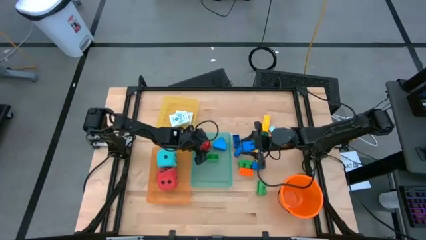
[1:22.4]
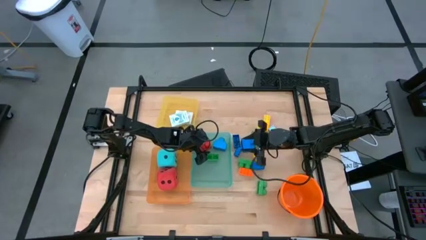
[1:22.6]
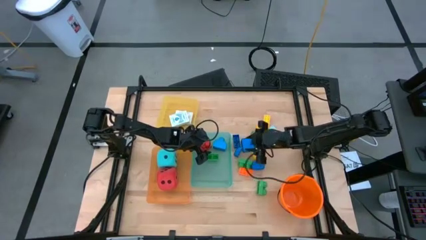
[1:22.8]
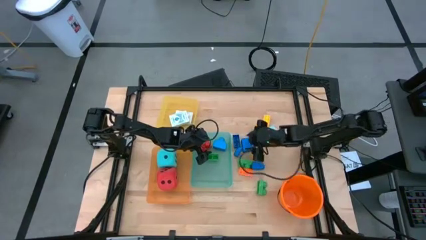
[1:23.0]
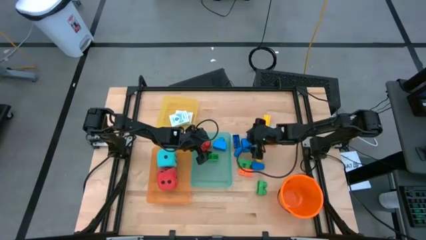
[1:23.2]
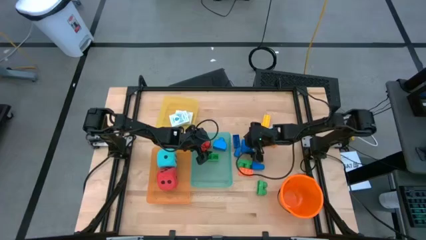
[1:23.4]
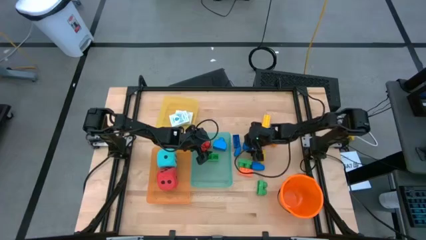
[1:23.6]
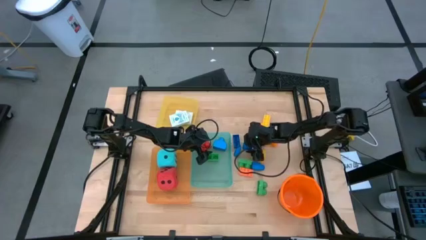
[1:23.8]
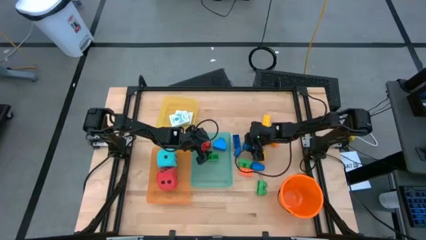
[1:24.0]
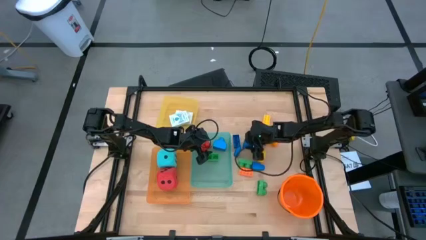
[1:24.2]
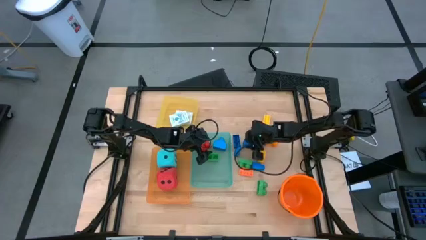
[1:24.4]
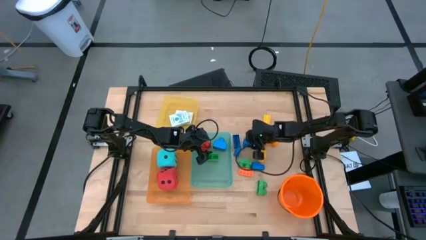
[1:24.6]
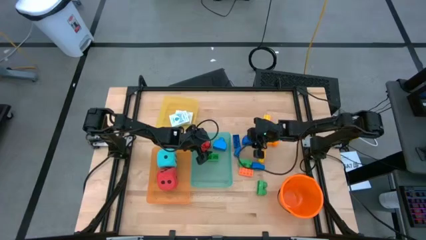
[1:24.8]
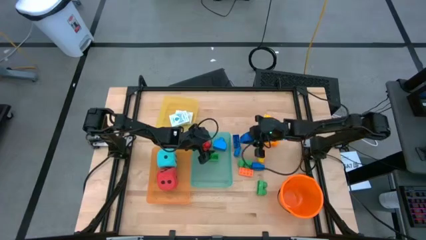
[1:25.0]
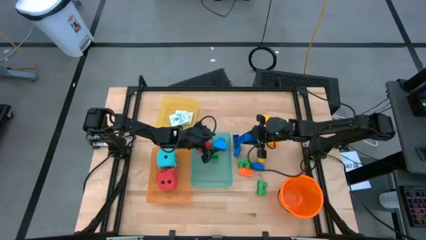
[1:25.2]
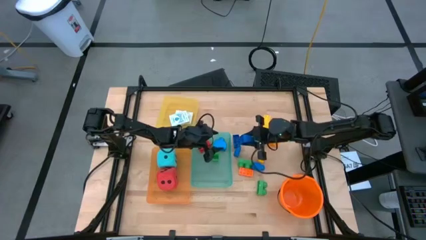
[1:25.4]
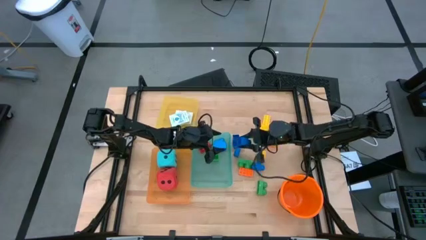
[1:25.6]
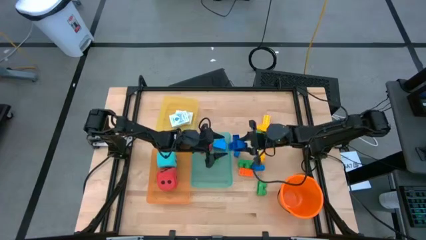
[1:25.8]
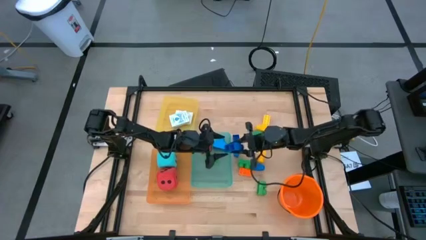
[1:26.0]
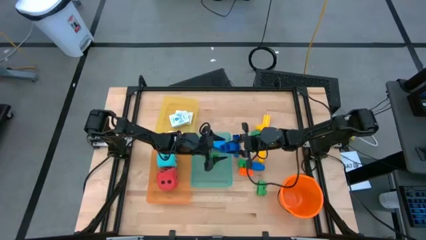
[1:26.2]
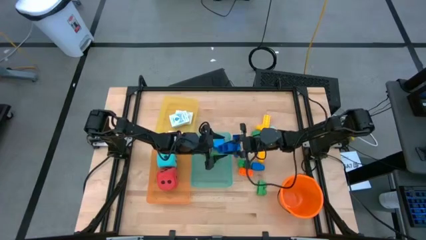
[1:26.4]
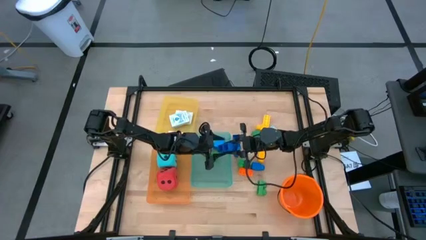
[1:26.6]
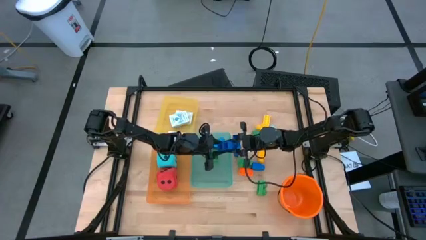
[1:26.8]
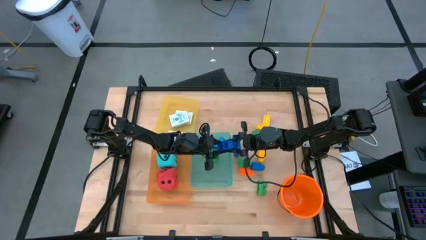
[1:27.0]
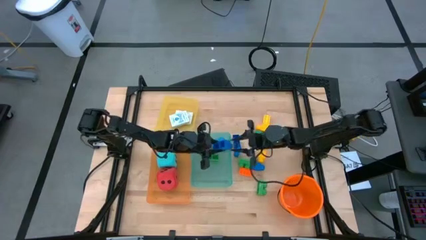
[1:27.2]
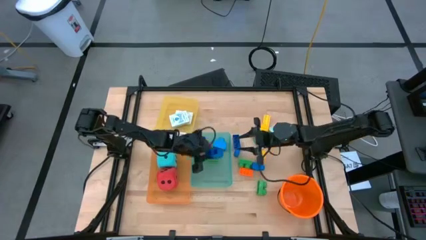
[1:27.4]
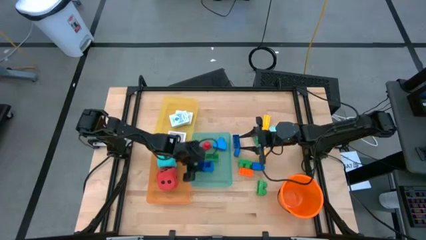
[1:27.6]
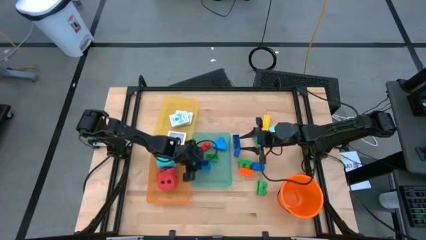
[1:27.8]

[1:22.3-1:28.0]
Task: Pick & Place Toys
Put the blue game piece into the green bin

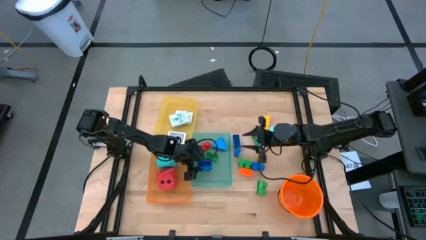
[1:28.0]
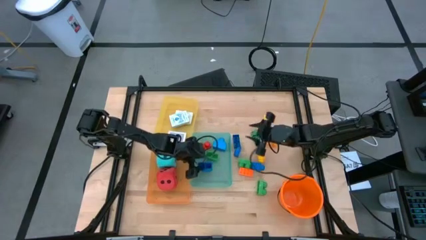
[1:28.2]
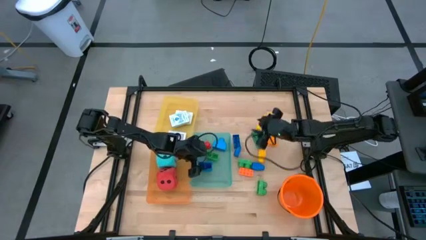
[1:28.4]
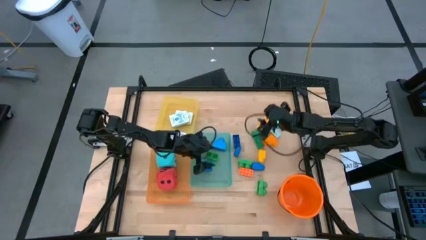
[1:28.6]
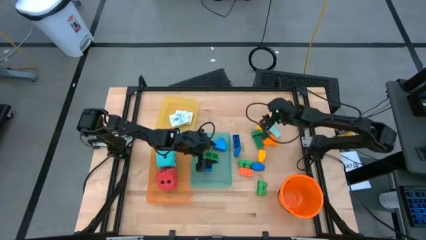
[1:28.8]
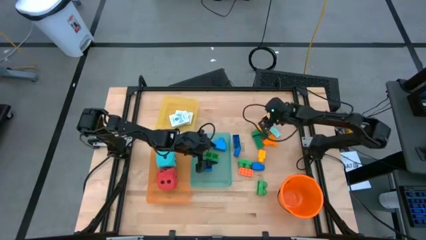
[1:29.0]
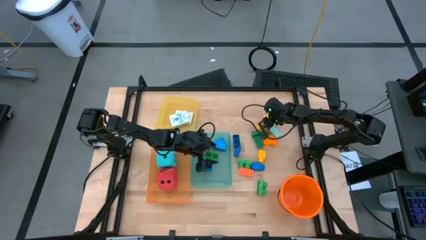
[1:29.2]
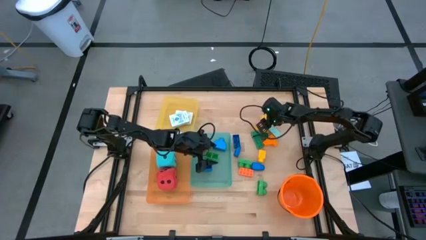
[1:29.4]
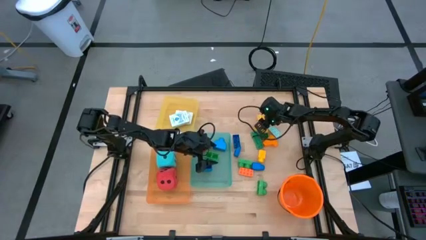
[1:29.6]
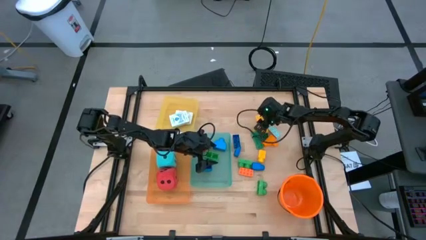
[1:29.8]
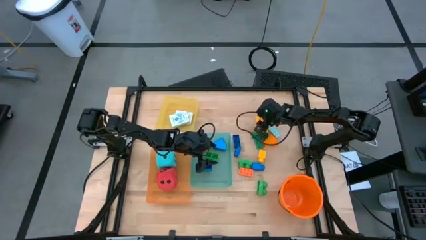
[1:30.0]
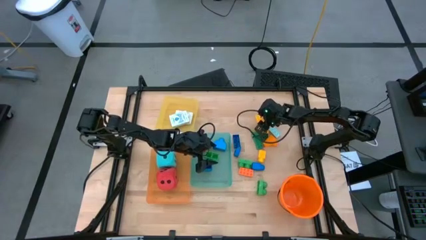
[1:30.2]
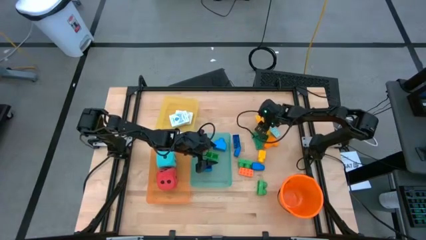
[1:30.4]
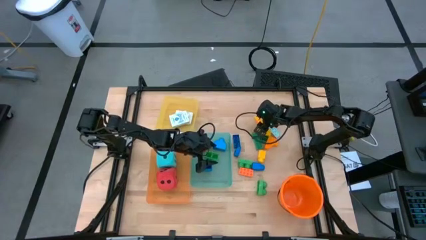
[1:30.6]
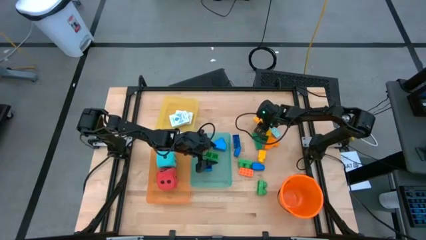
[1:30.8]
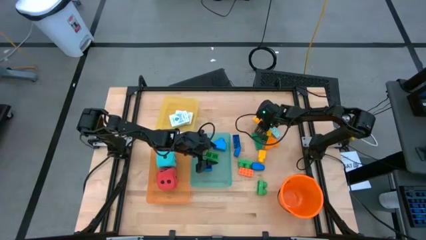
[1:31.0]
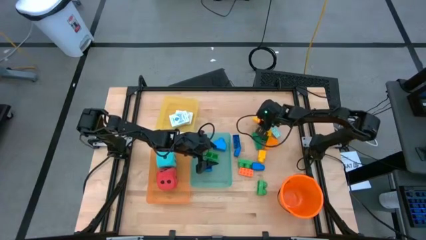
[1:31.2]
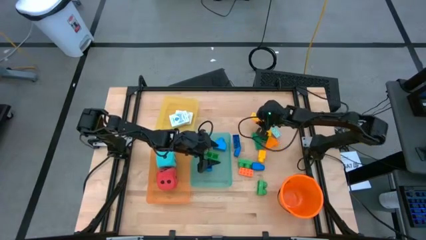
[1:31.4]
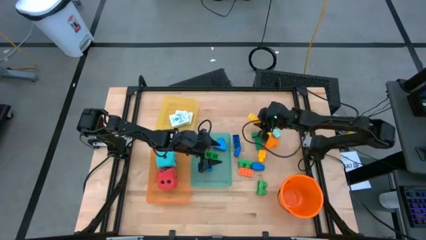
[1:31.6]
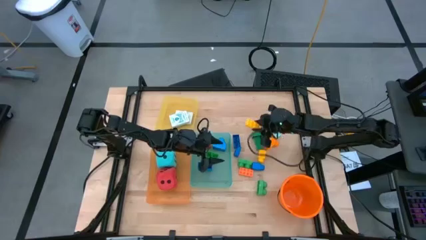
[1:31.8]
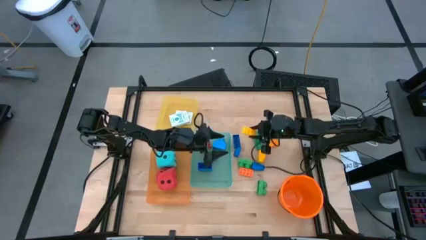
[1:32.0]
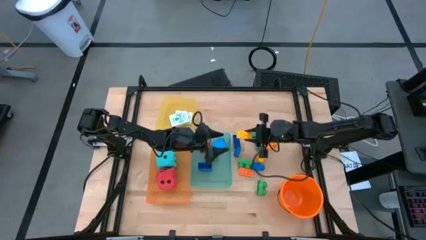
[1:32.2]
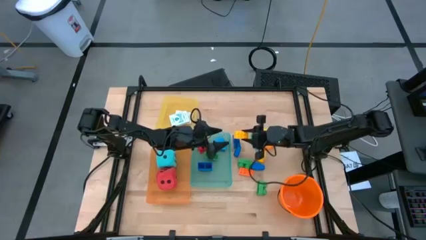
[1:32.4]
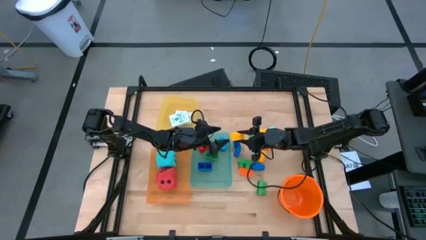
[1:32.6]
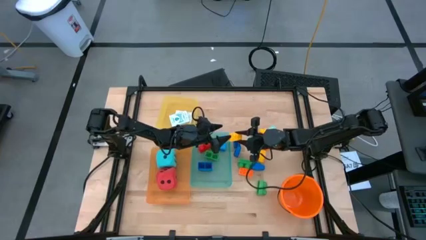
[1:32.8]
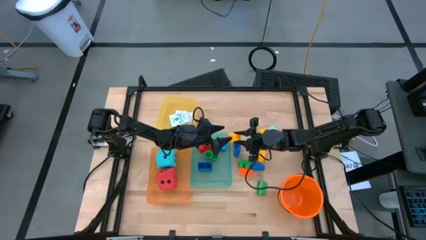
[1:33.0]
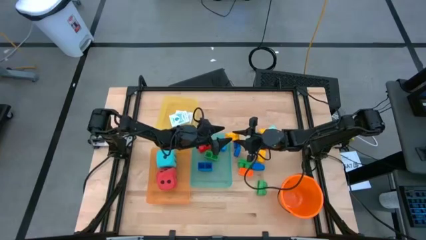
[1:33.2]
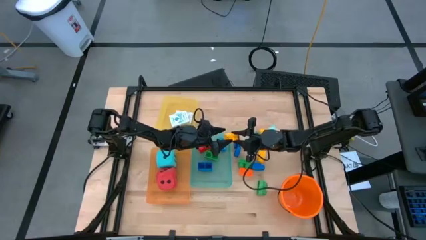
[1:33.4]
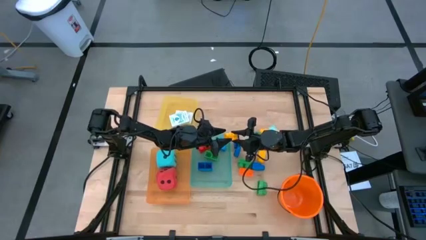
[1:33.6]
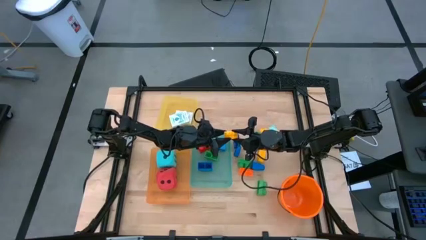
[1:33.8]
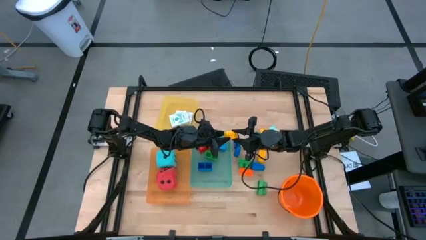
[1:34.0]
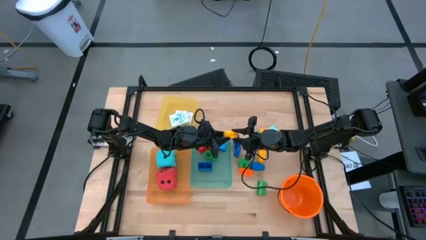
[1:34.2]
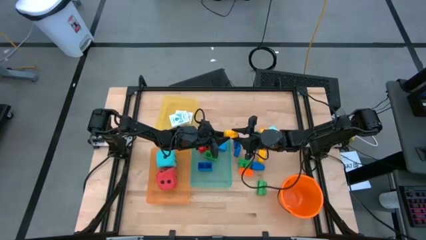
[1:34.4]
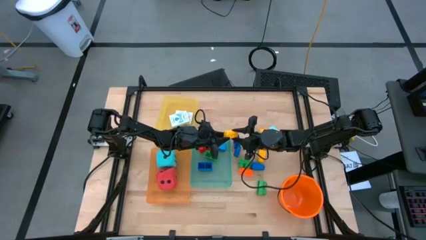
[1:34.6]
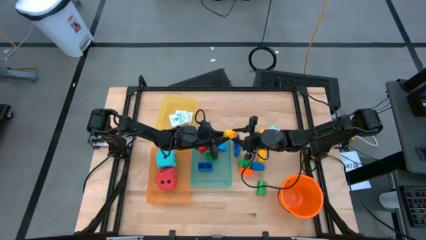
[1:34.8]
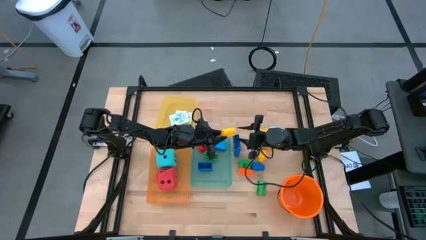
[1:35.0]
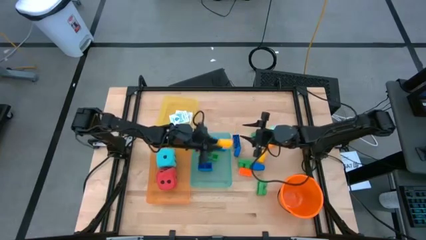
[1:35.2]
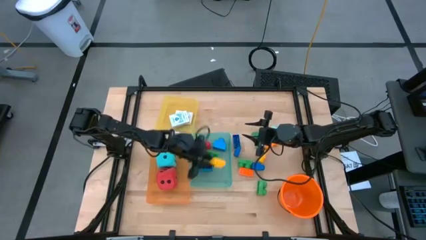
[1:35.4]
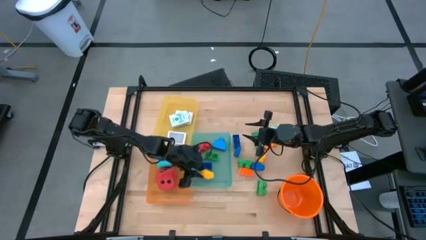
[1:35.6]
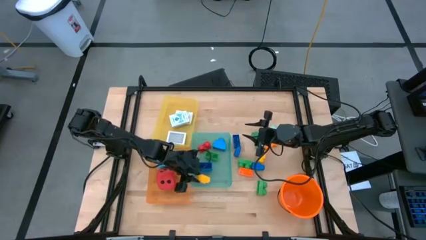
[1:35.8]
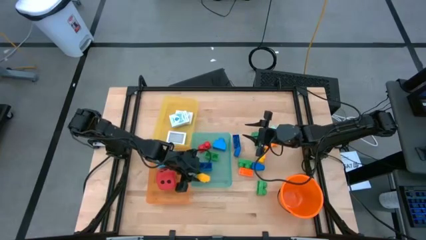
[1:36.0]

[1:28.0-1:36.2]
Put the yellow game piece into the green bin

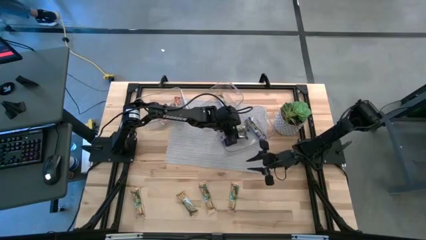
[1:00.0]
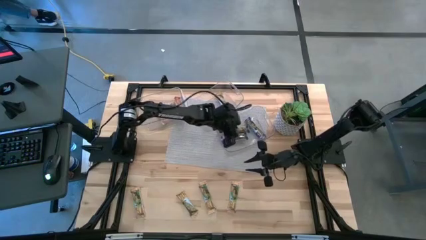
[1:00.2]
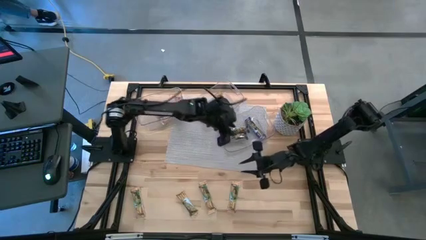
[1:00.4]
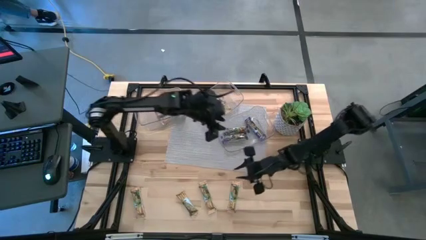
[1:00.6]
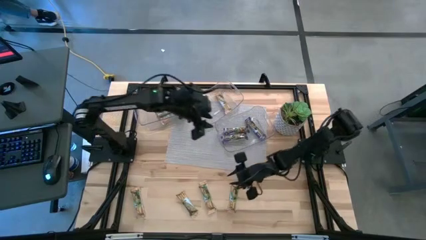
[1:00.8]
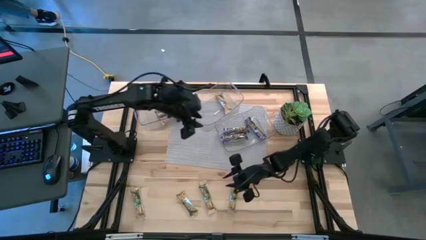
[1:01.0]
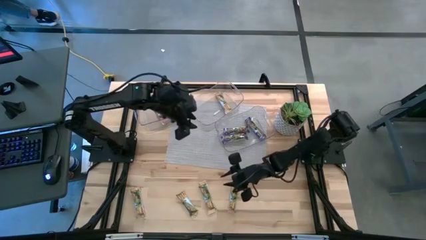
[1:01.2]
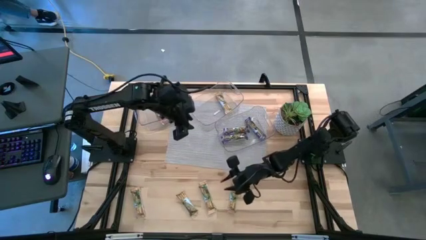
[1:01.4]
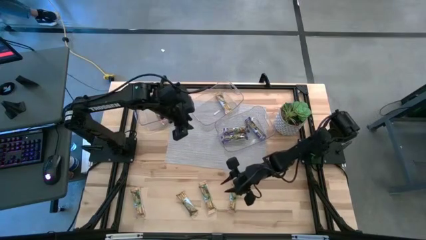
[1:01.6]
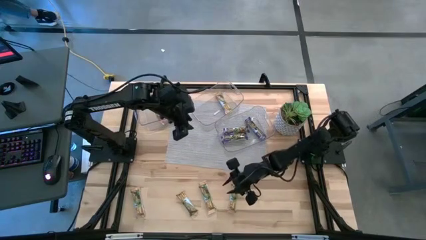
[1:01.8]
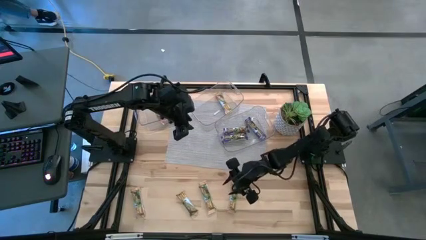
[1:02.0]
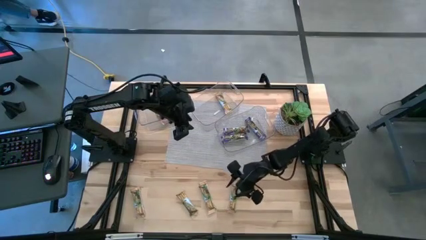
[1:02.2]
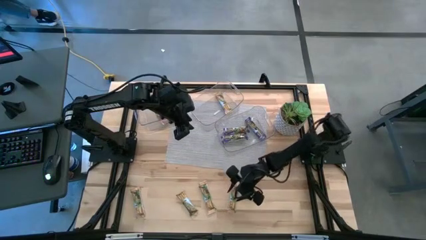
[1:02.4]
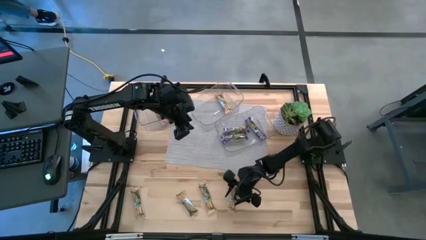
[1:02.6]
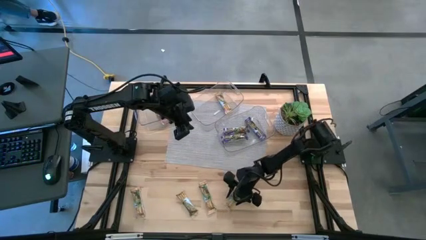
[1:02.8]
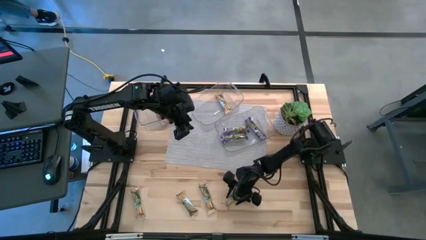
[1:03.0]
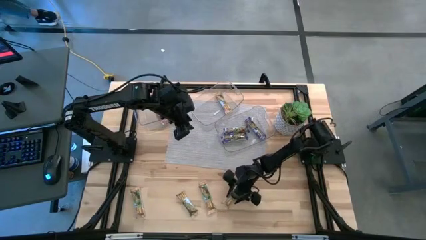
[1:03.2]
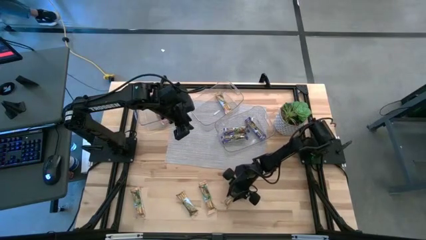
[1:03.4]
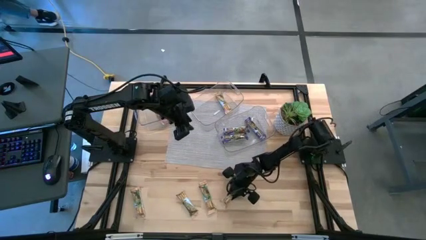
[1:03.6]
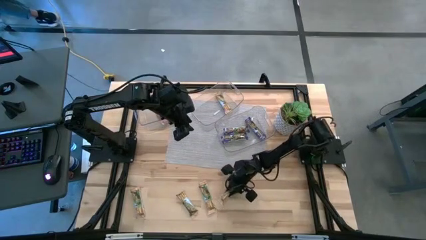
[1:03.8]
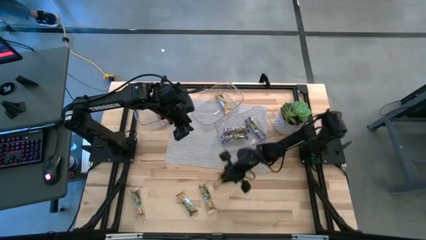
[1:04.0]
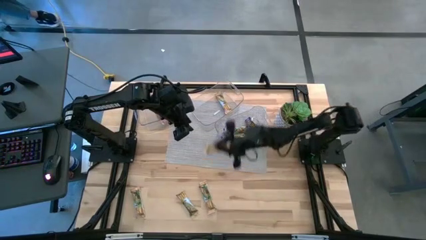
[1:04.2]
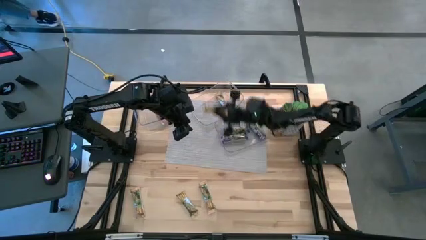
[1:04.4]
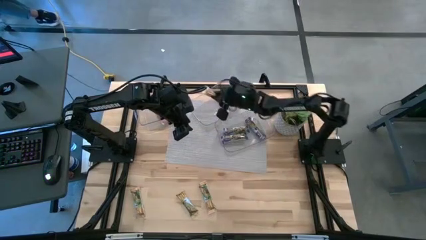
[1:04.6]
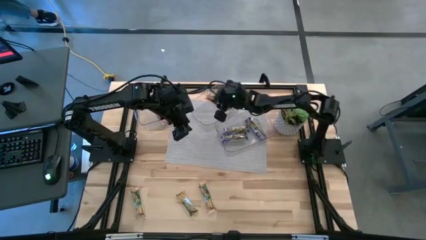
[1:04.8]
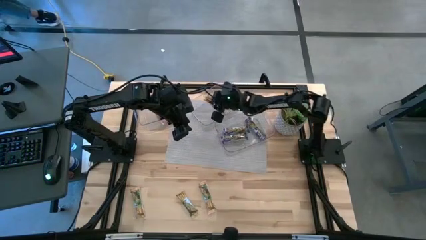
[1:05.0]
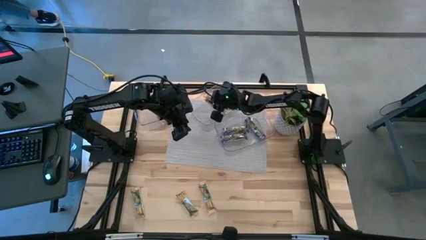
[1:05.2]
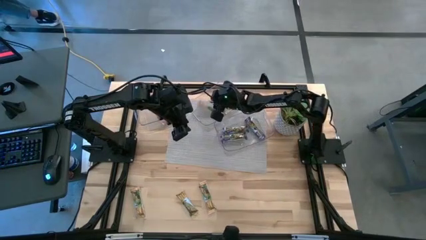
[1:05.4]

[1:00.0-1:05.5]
Task: Pick and place Granola Bars by type
Put the orange granola bar into the middle transparent bin
